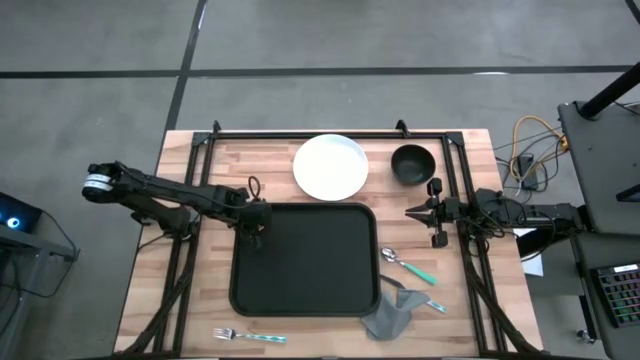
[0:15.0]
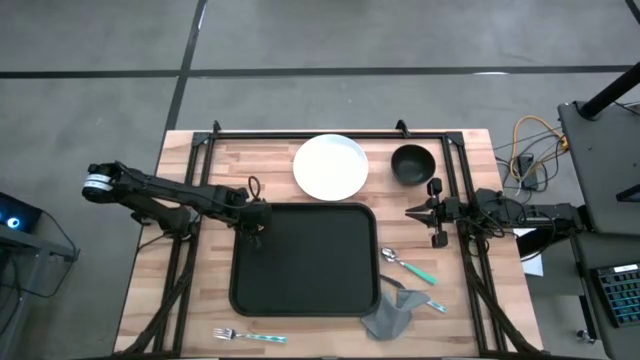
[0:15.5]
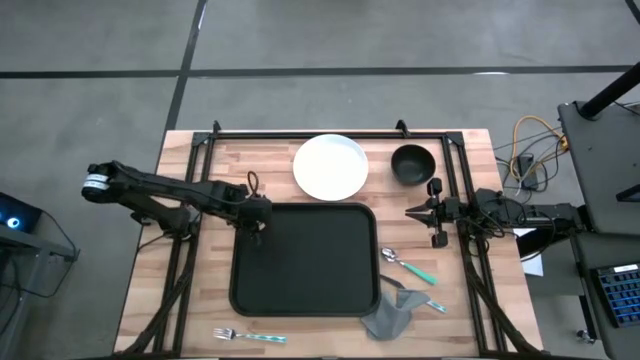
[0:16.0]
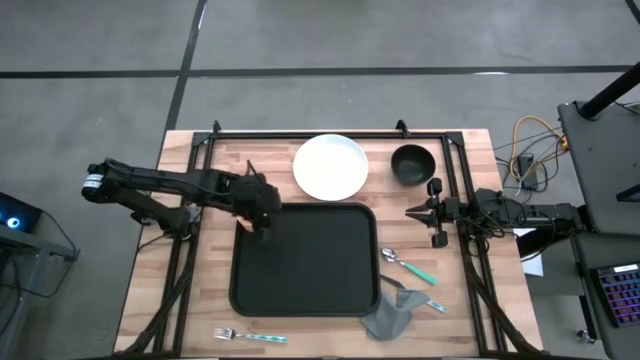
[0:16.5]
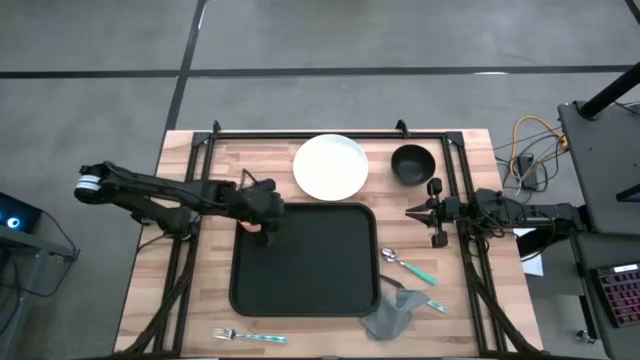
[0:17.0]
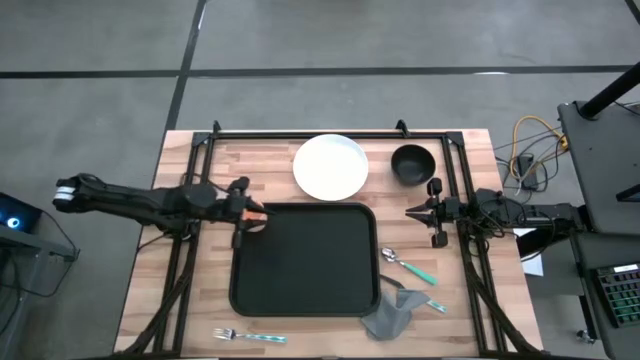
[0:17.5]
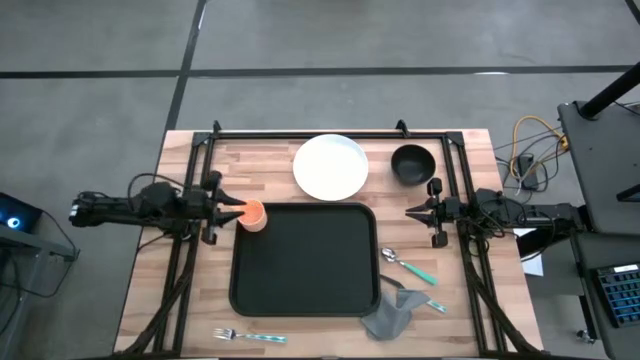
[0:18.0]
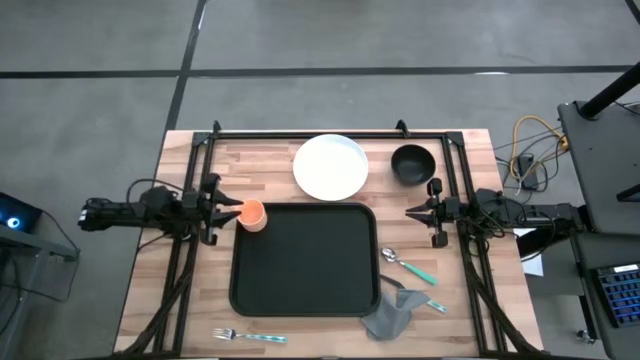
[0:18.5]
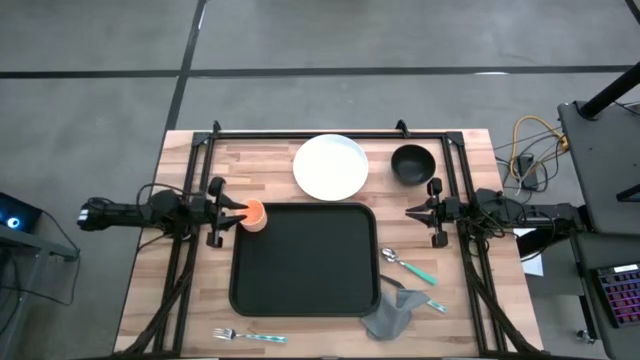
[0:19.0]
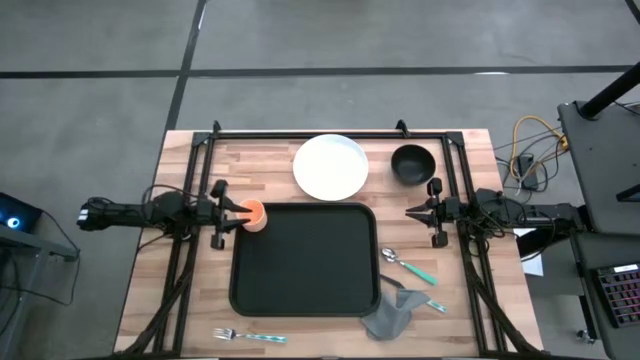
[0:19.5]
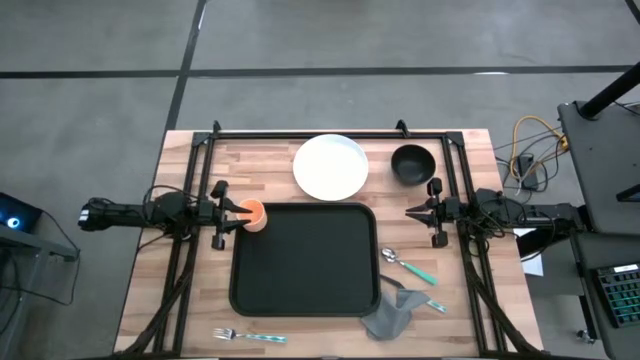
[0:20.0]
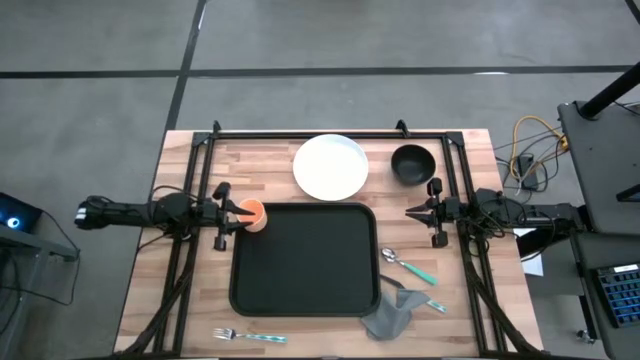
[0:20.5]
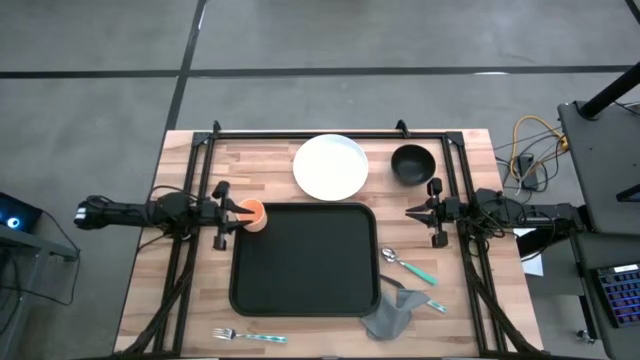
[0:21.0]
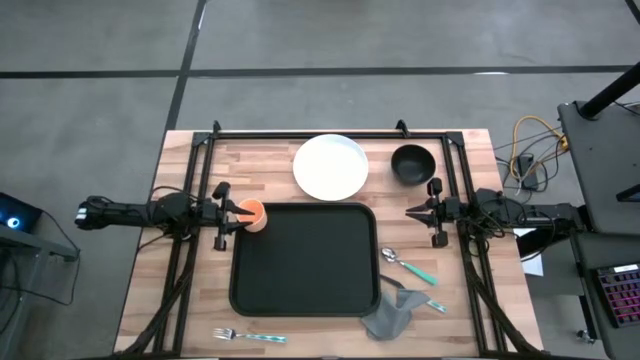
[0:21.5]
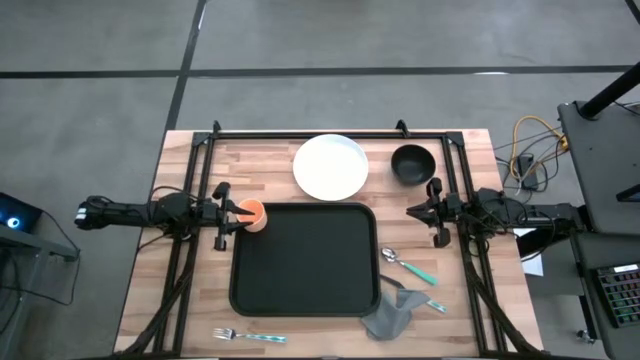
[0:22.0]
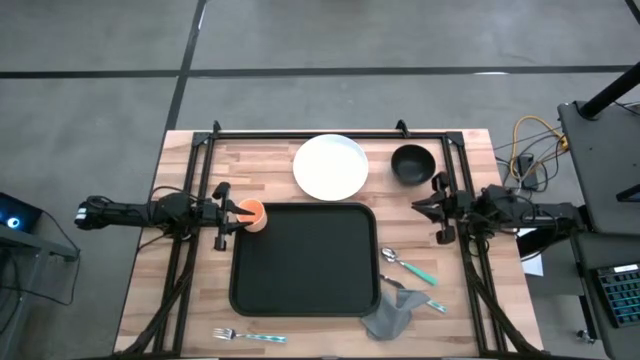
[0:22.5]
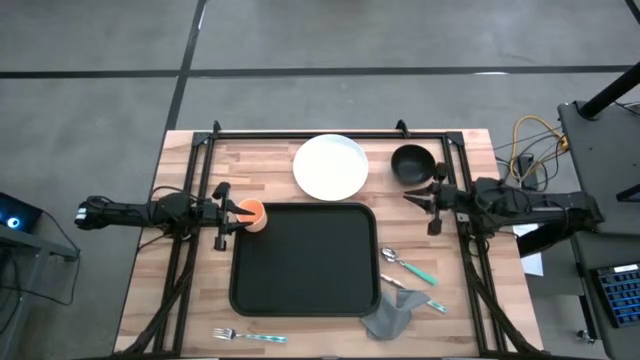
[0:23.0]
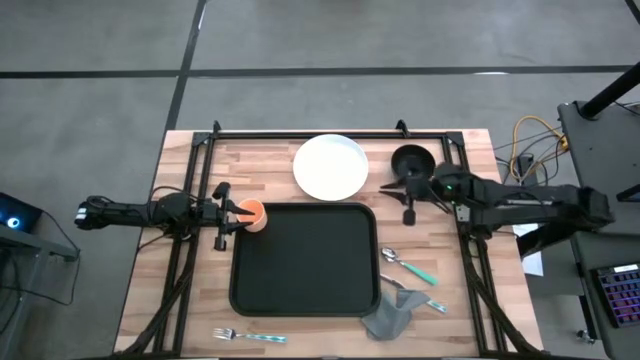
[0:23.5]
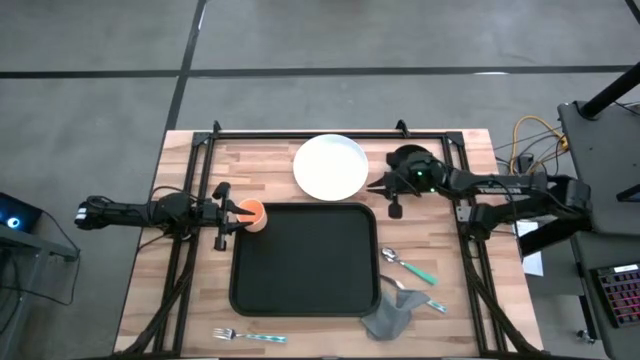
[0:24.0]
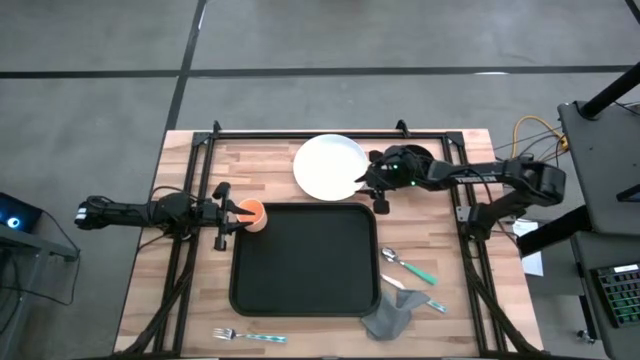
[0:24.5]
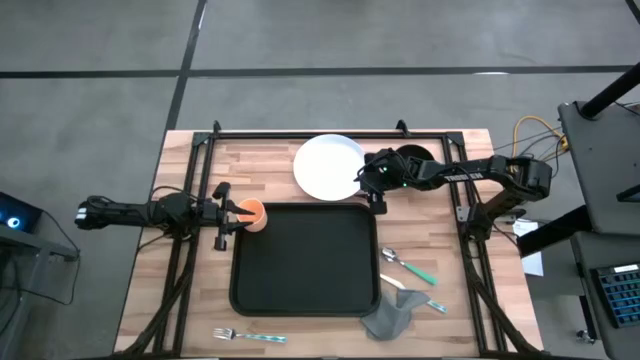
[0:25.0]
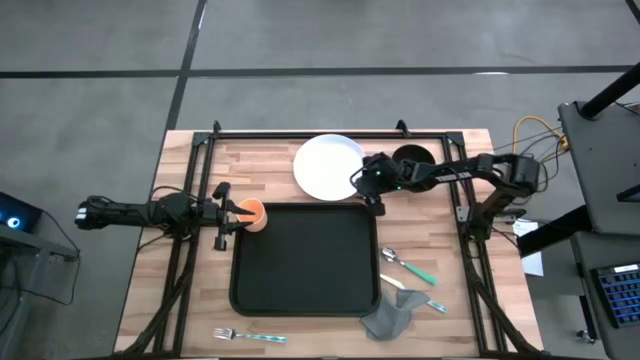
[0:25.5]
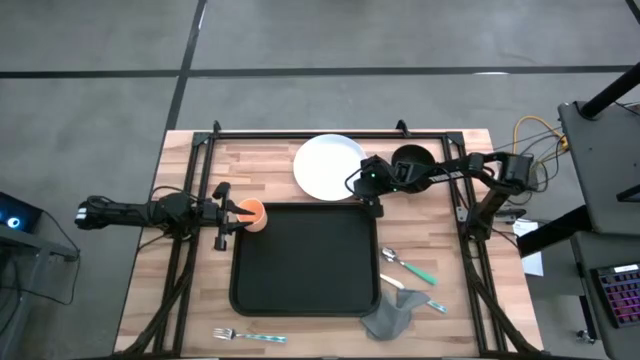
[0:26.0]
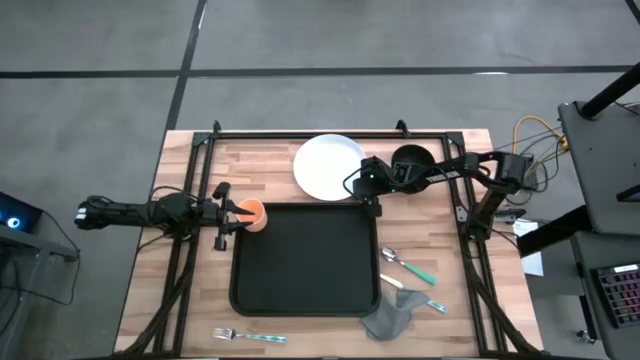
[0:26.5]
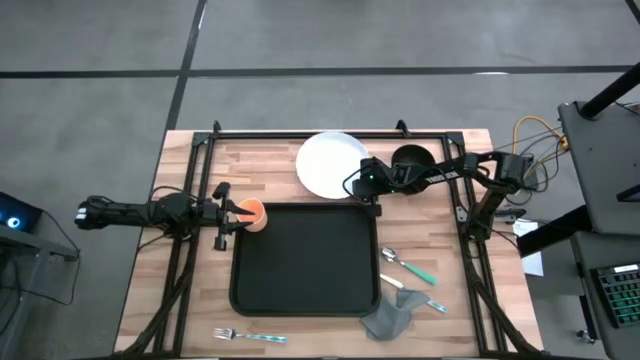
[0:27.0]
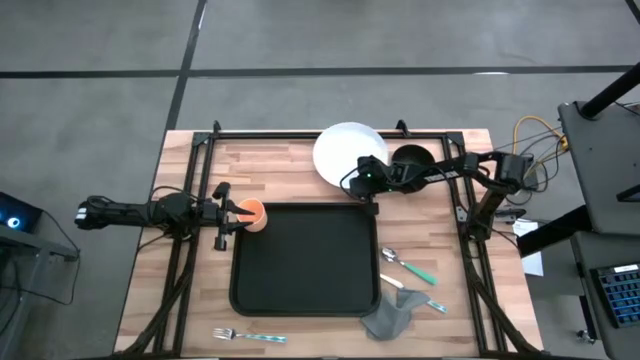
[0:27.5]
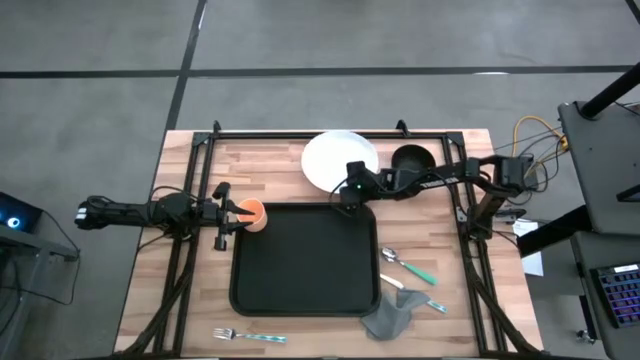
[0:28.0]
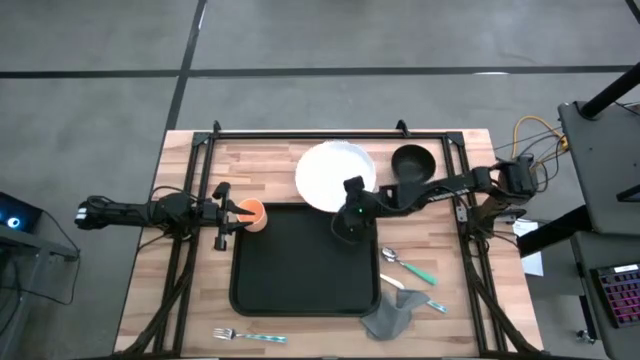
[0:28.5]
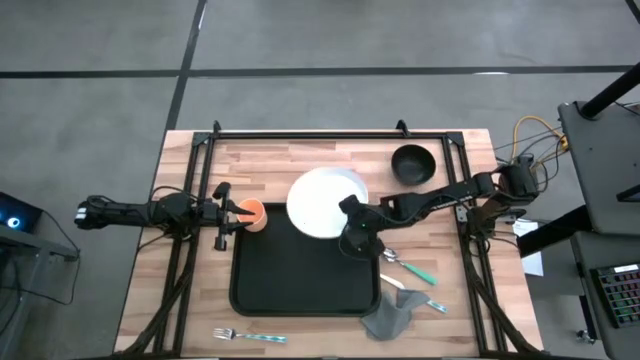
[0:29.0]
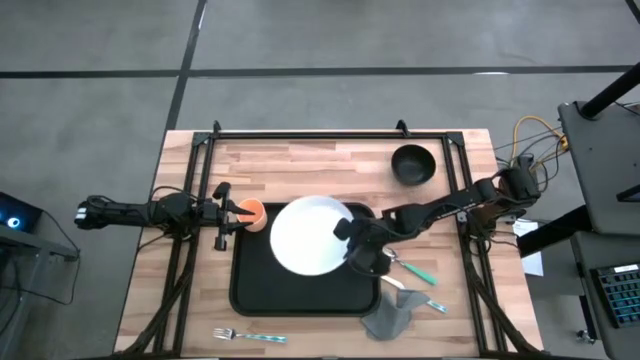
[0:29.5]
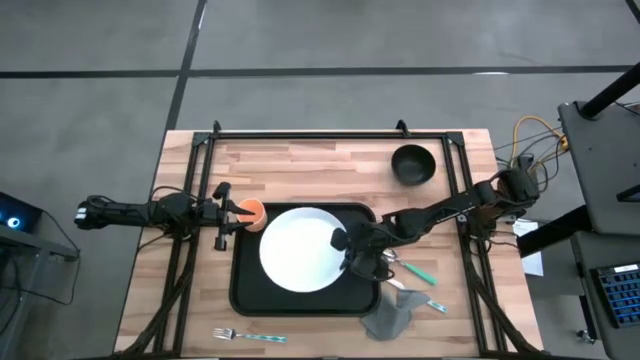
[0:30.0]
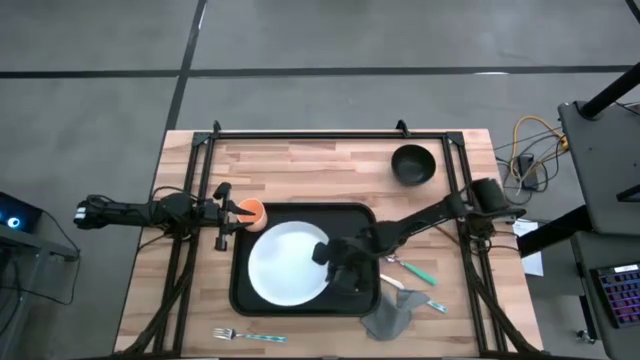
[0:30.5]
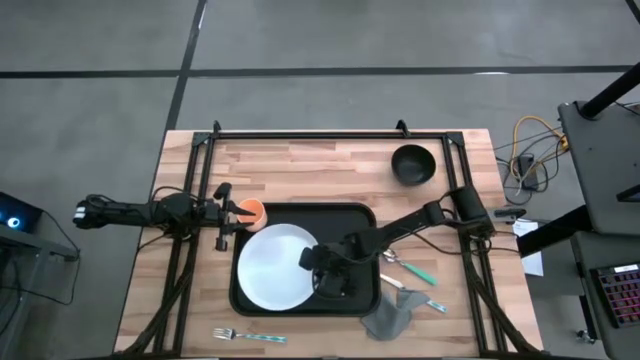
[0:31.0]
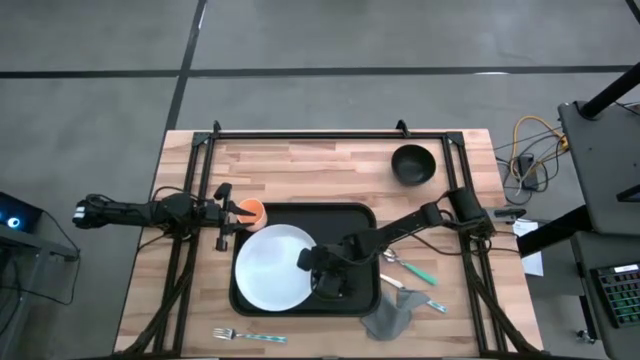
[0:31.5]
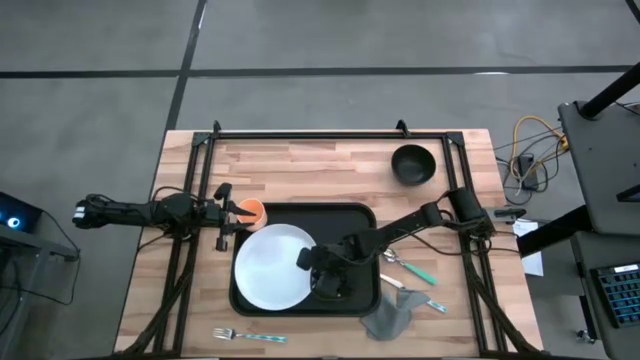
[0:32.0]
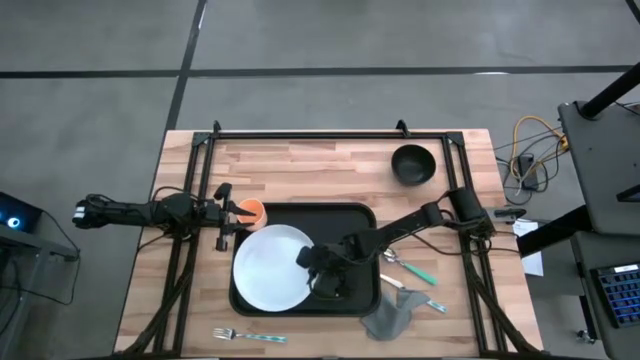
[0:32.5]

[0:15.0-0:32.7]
Task: Set up tray
Put the plate on the serving tray
